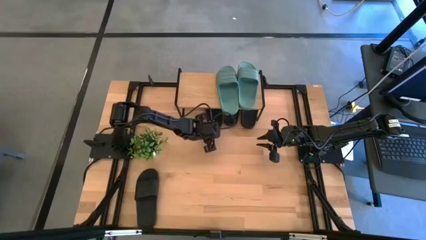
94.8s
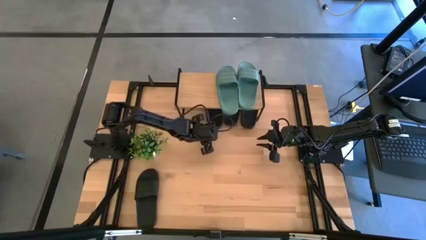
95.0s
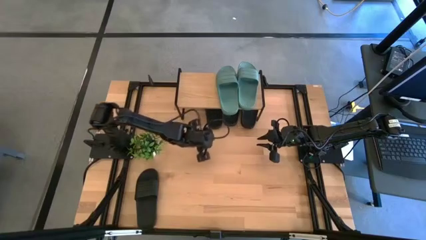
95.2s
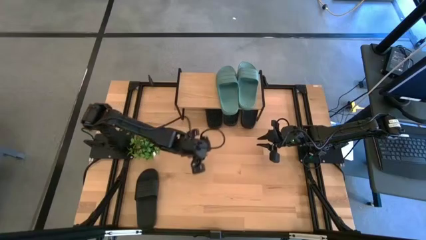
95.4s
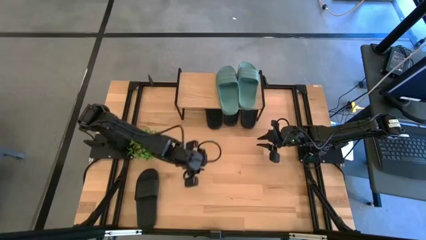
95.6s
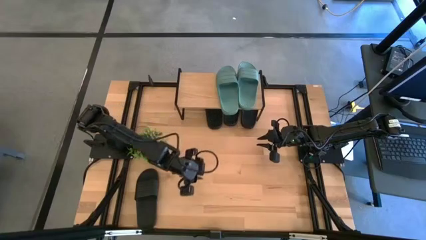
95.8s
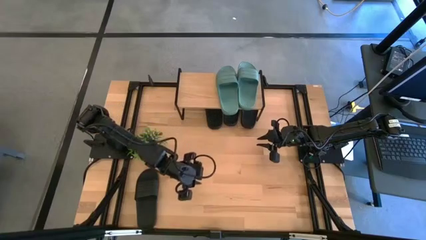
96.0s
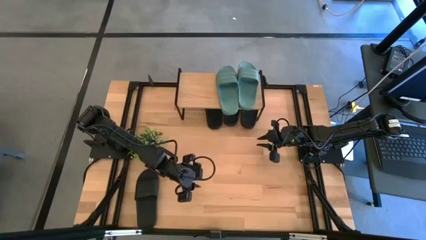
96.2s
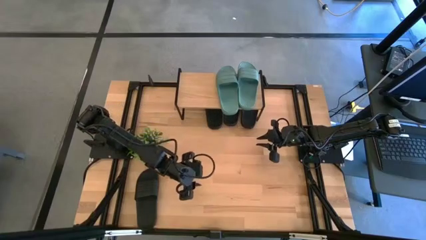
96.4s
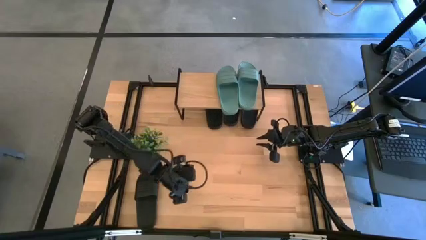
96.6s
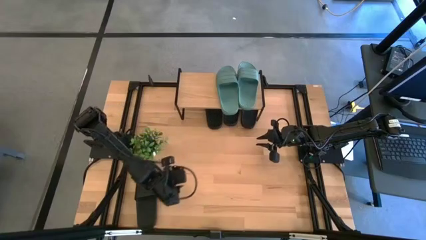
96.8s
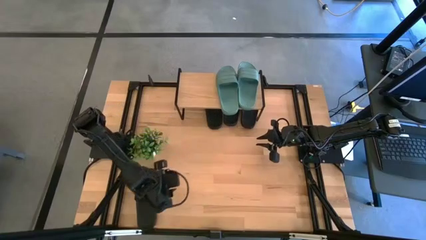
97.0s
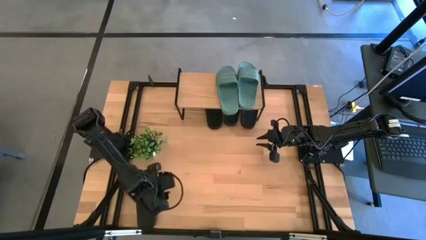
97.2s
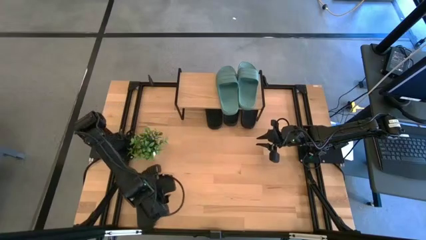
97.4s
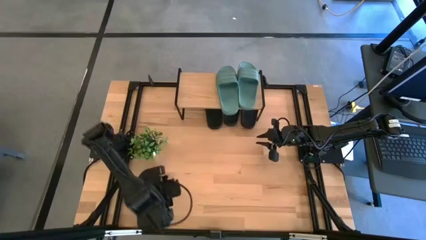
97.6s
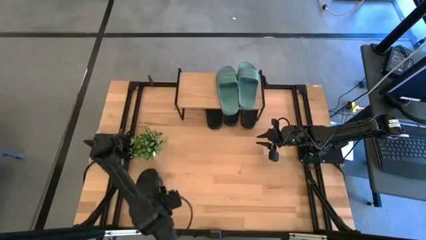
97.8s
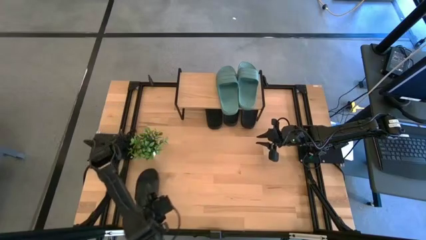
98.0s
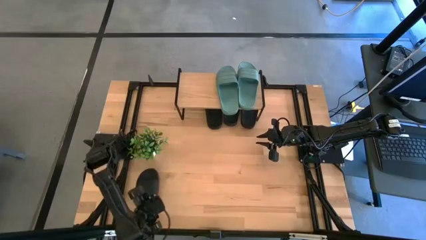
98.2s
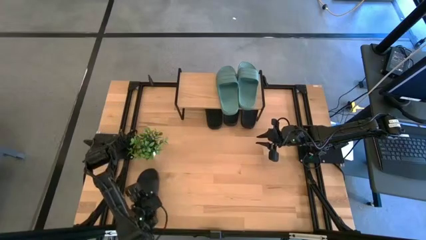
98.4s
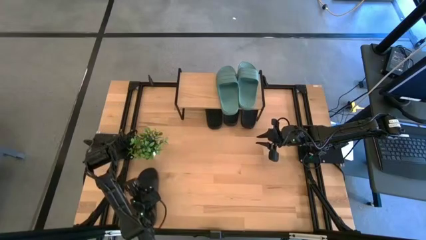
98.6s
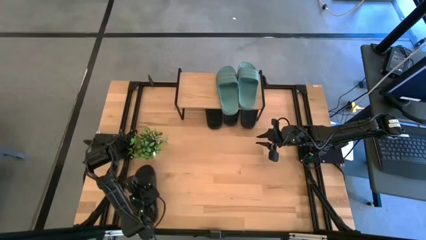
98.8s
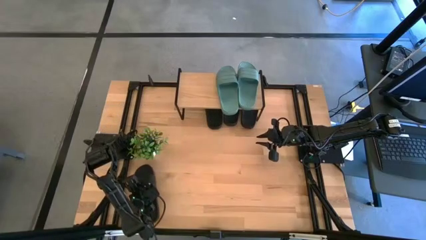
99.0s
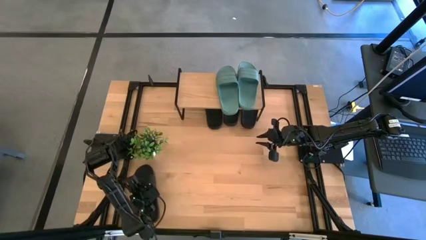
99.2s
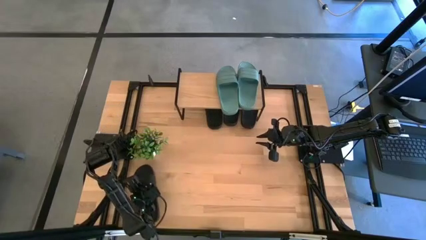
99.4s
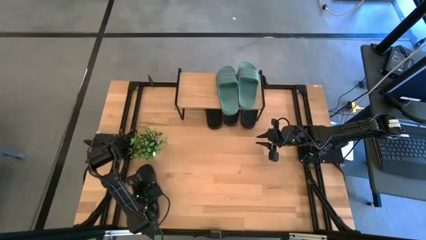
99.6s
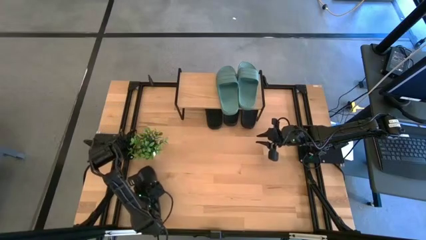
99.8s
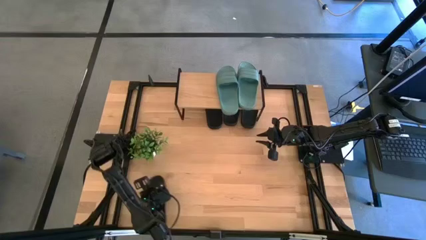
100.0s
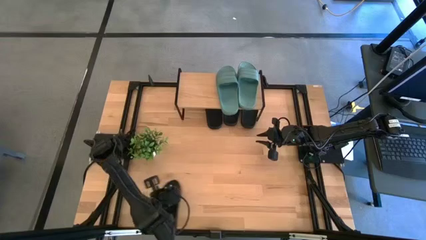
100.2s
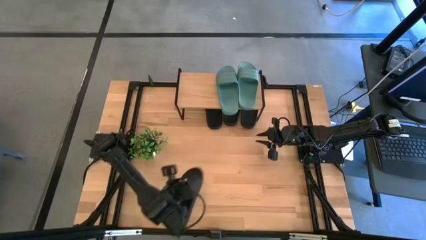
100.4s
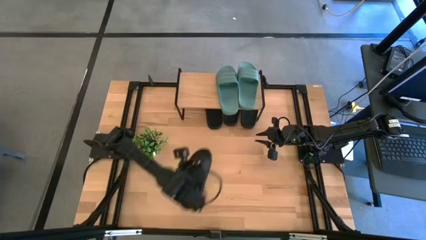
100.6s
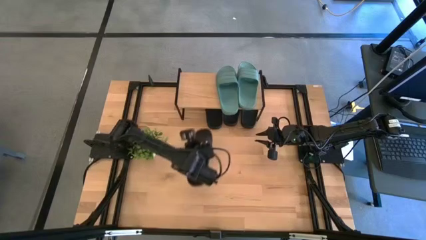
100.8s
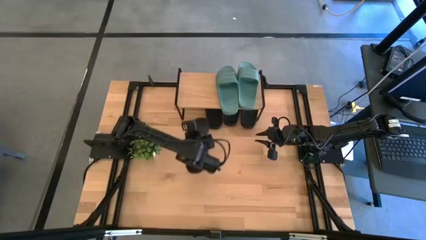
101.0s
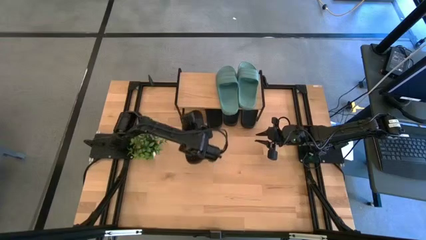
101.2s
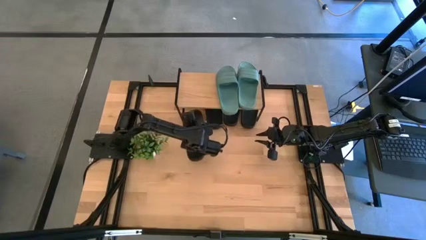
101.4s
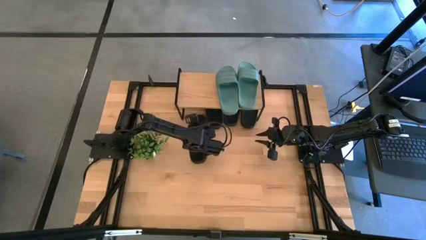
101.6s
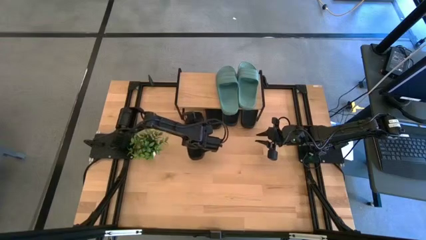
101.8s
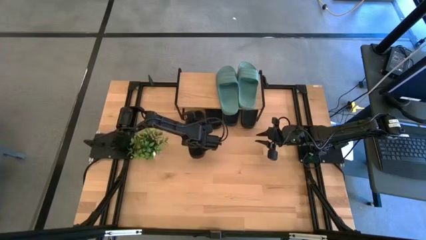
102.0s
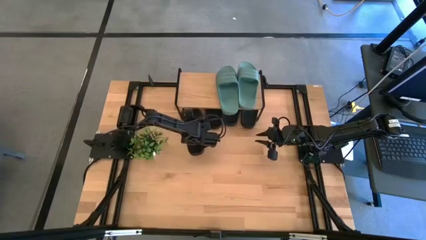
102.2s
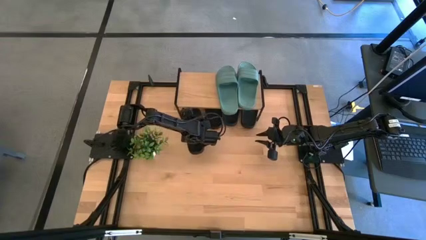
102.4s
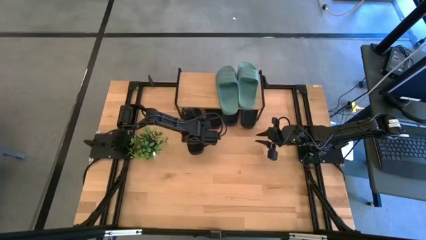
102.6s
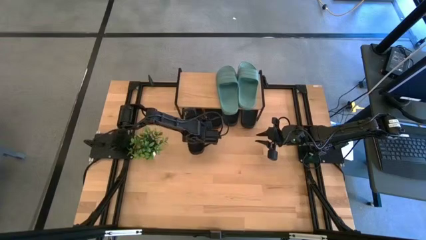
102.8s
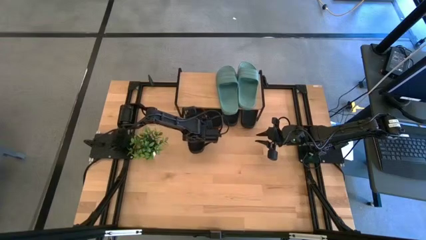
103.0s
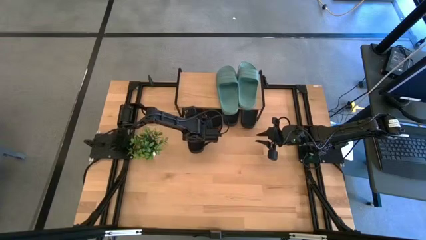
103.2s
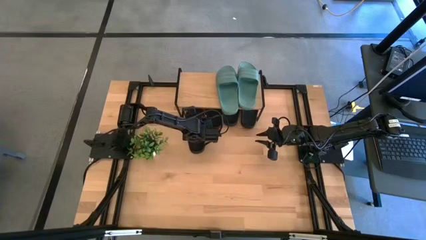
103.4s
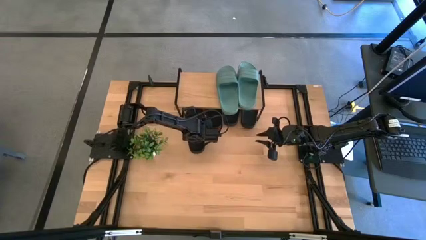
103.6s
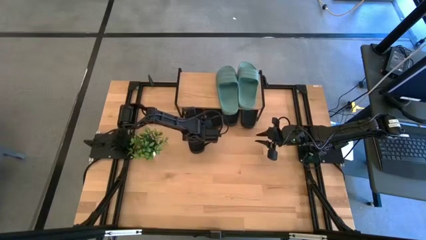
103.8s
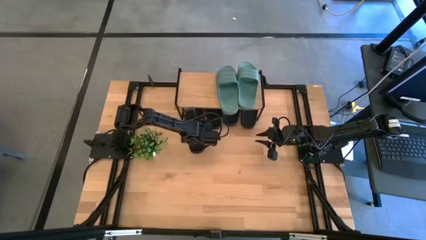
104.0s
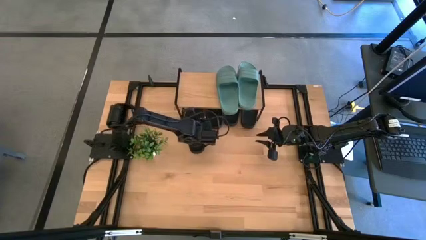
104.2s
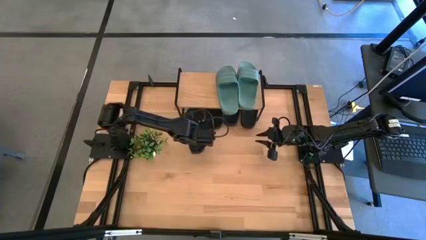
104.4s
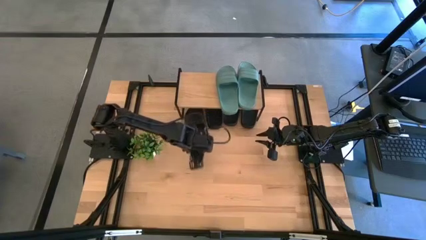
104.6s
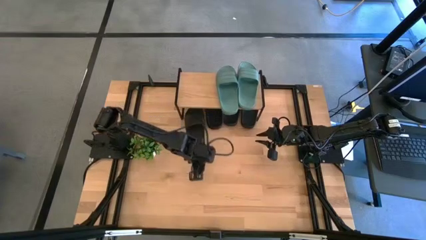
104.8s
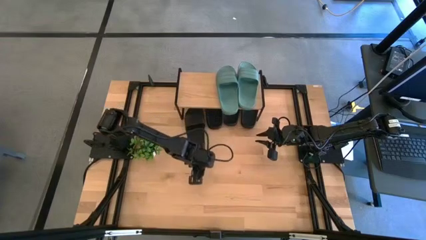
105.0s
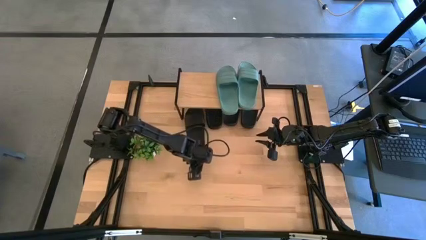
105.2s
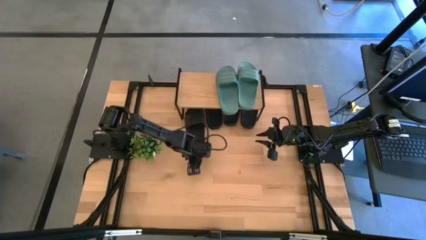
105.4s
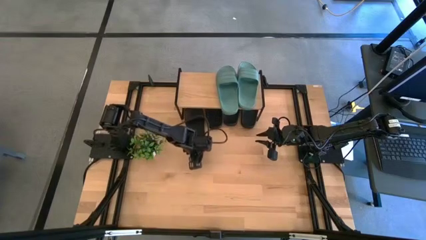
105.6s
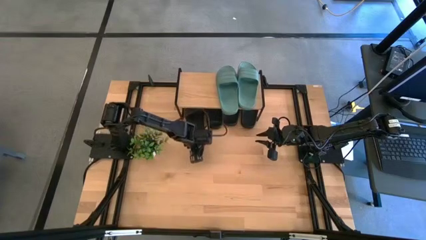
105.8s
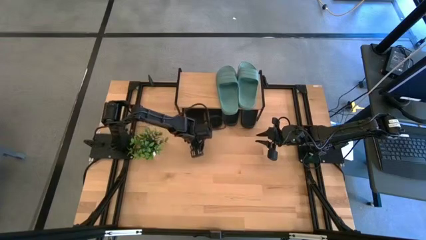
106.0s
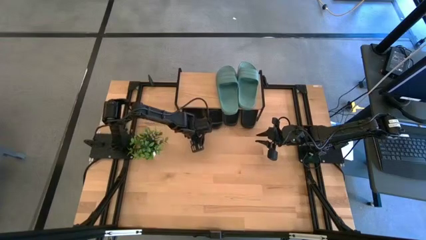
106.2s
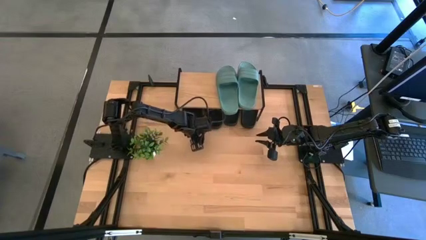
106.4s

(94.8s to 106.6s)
Task: Pick and place slides into the shelf
Put the black slide under the shelf

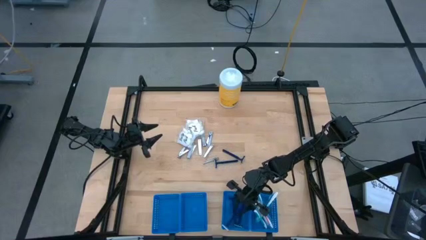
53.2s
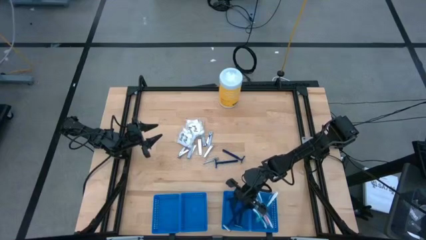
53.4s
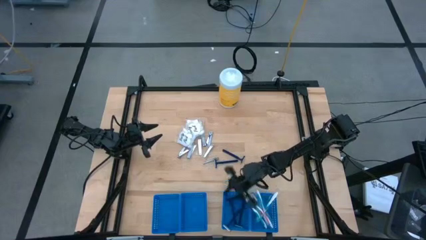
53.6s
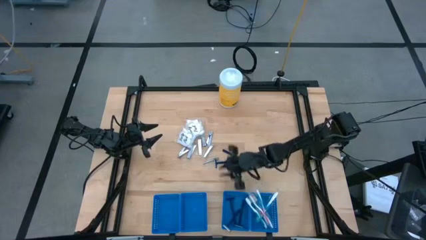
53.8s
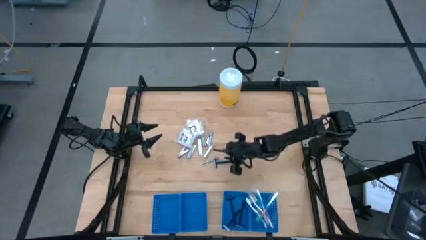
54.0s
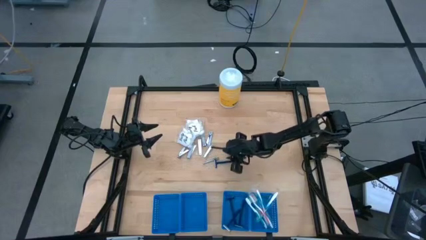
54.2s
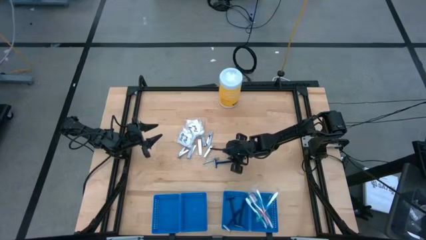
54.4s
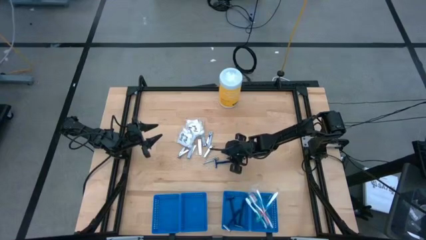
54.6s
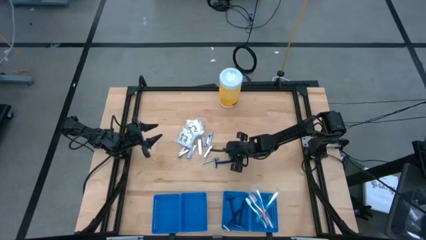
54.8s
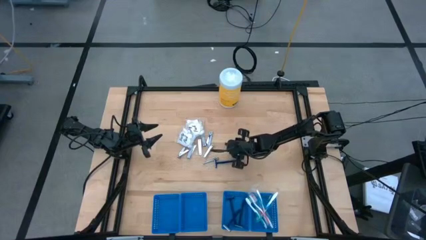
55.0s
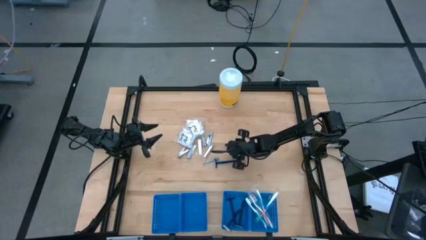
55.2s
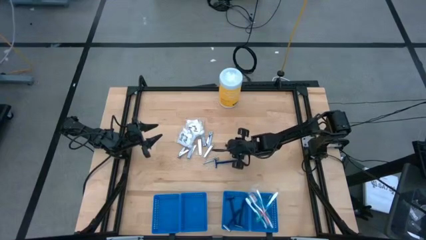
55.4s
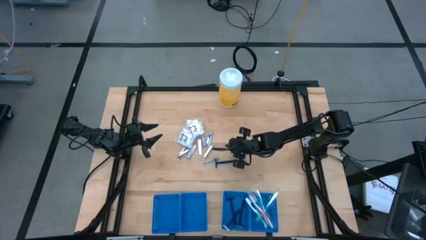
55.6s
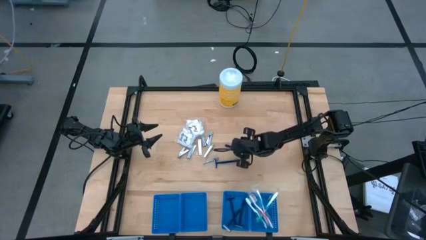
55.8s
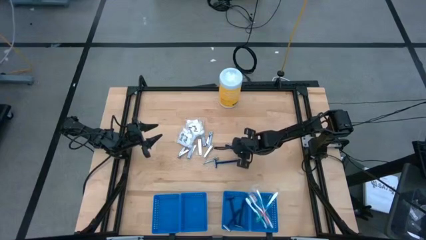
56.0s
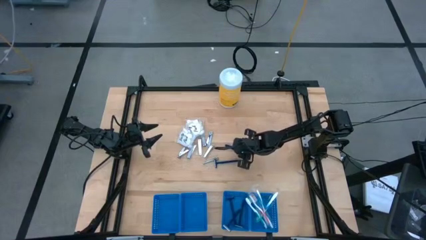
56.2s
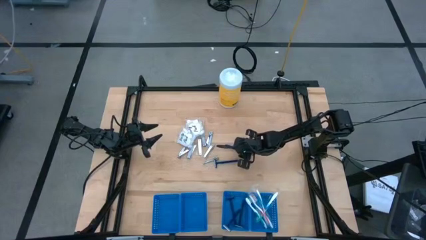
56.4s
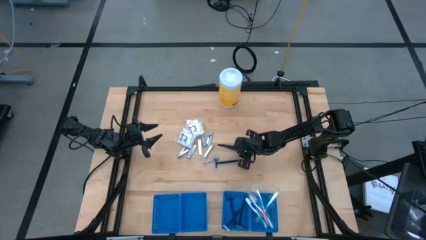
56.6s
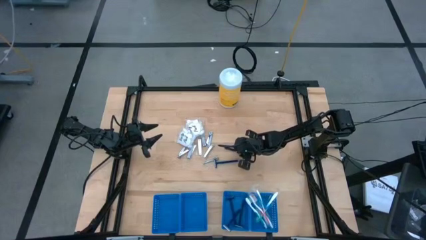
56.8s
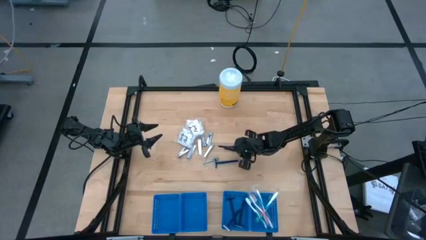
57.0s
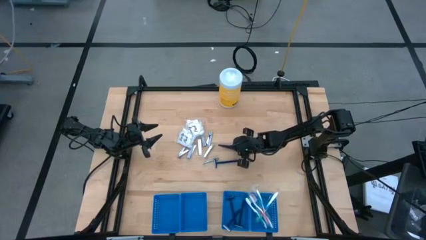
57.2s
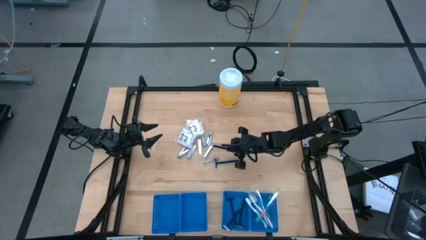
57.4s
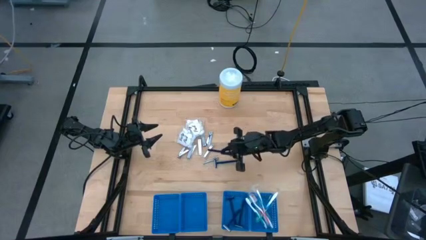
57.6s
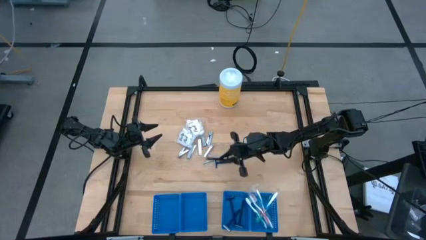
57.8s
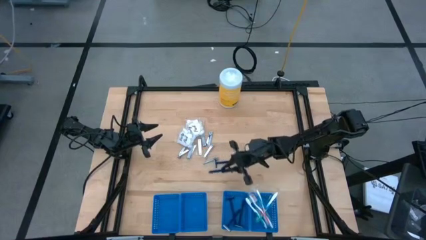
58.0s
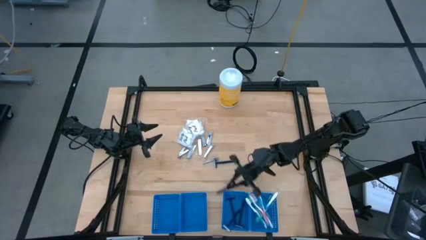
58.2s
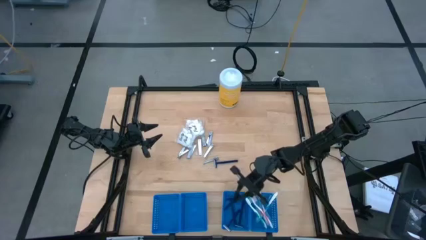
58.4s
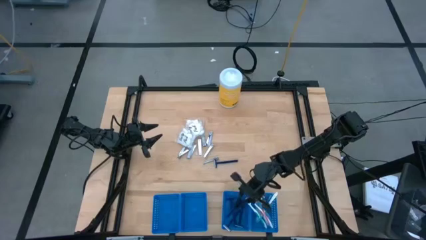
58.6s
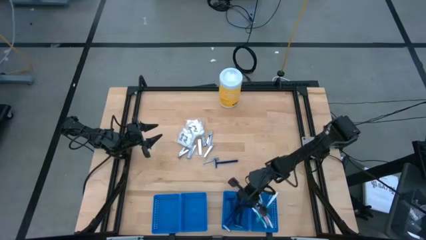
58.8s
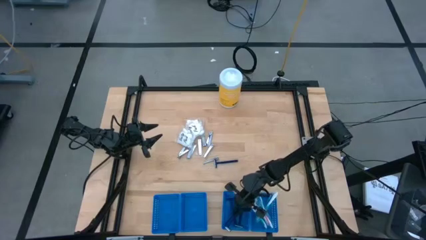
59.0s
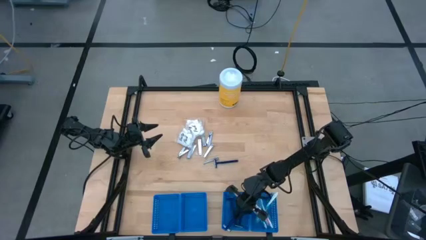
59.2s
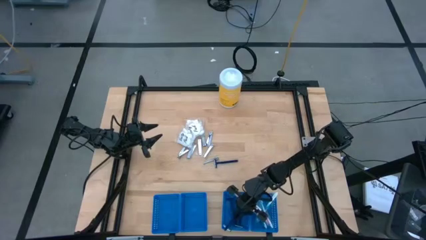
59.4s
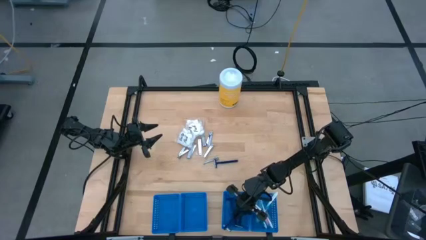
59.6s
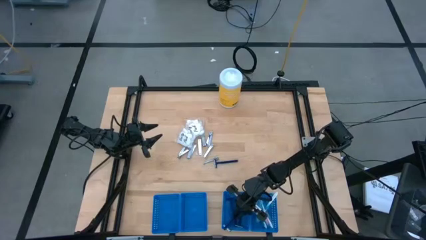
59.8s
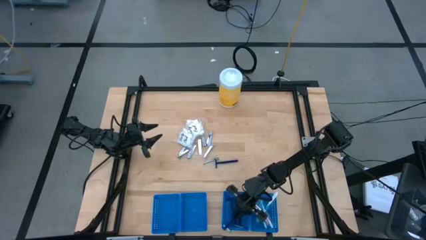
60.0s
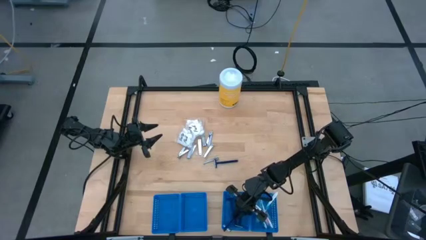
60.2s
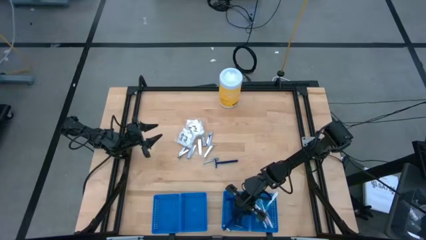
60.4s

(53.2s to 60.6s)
Task: Pick & Place Travel size toiletries
Put the blue razor into the blue basket
